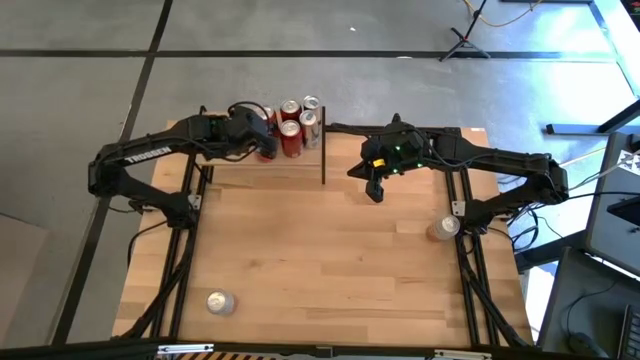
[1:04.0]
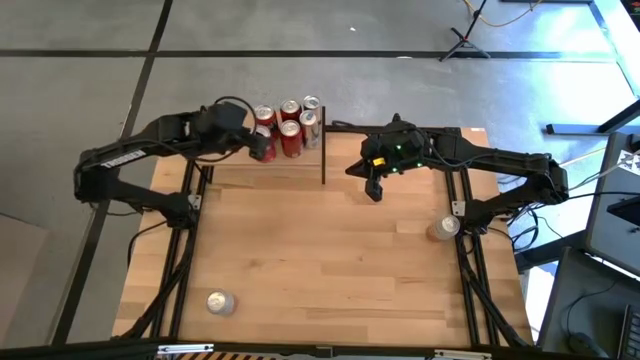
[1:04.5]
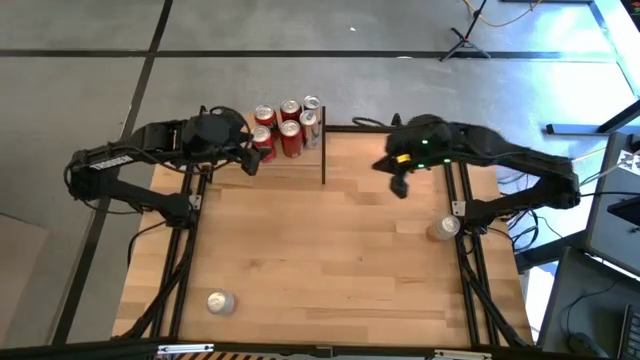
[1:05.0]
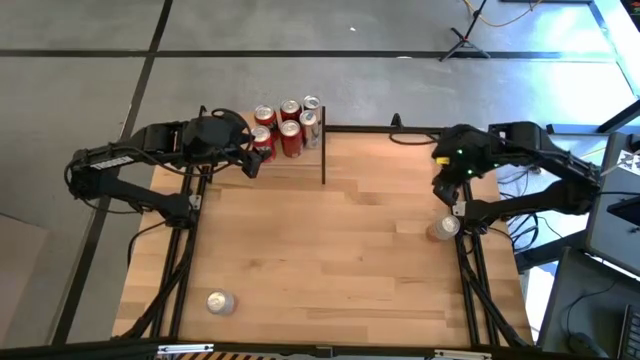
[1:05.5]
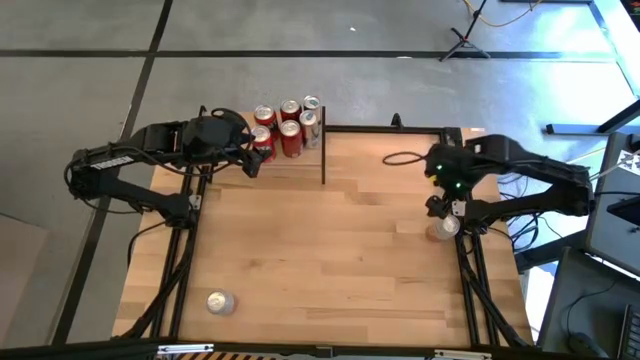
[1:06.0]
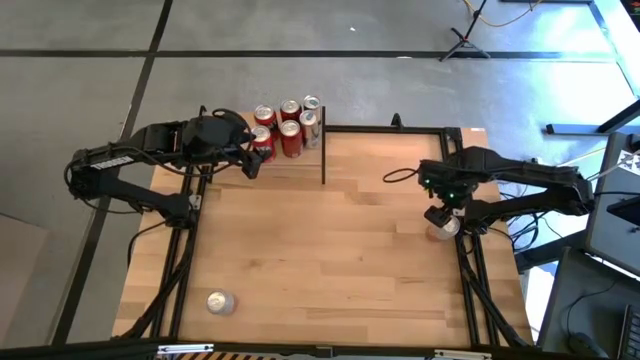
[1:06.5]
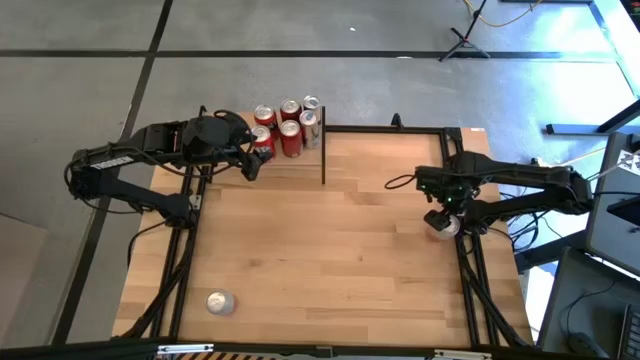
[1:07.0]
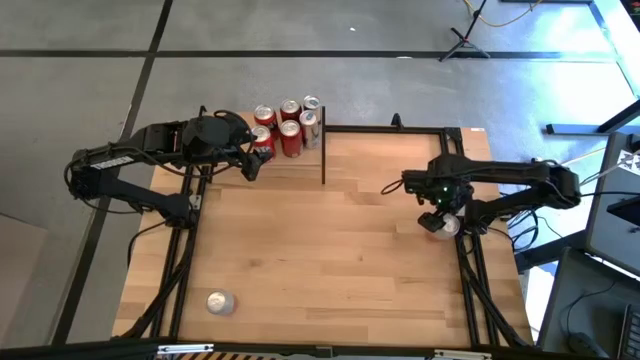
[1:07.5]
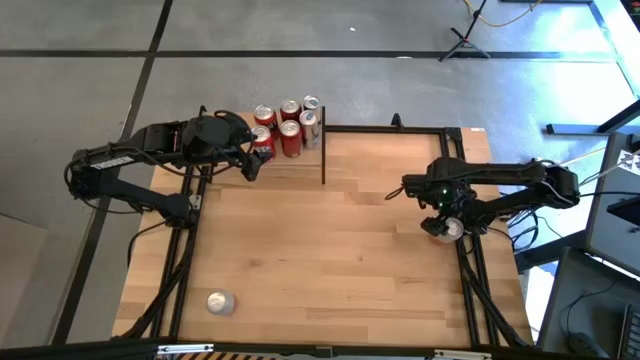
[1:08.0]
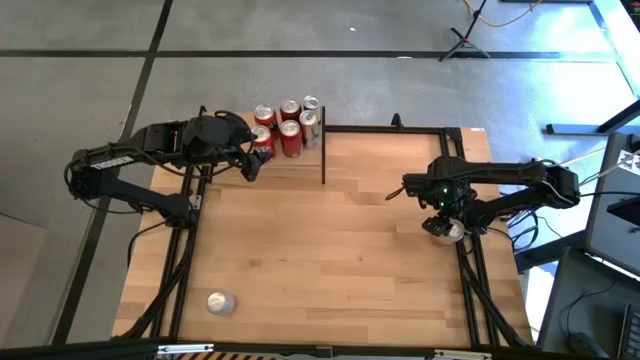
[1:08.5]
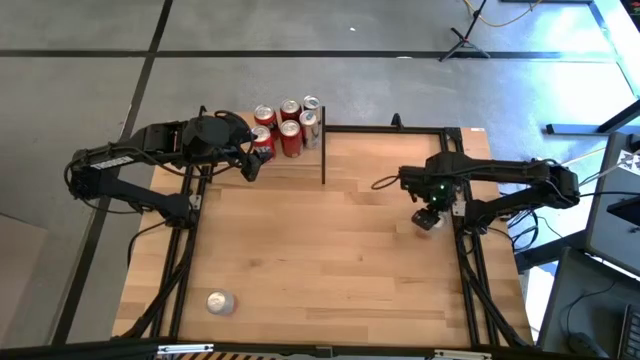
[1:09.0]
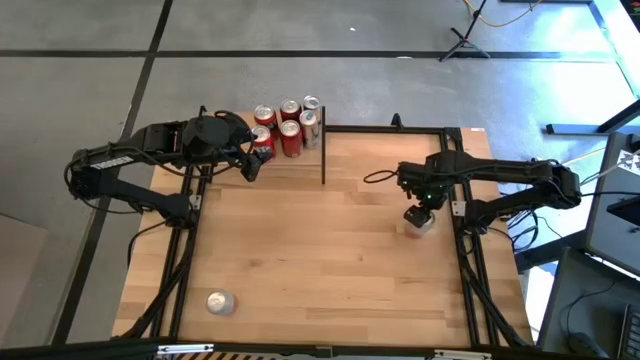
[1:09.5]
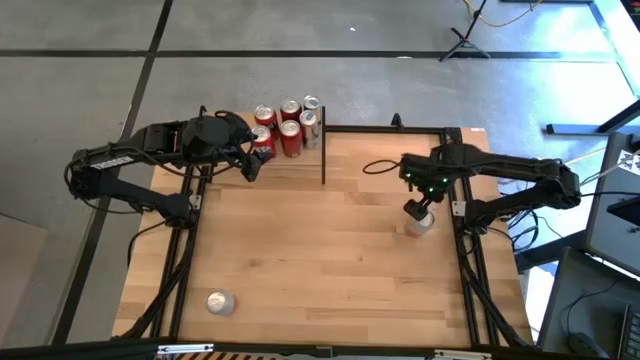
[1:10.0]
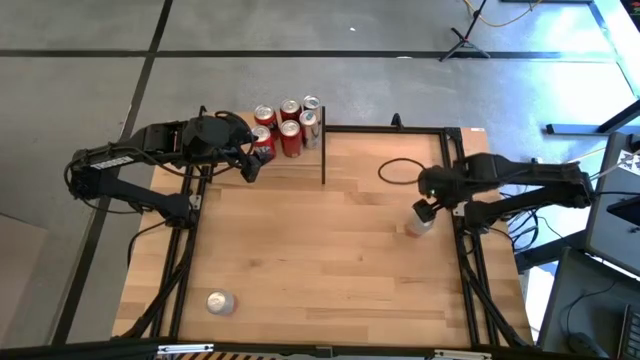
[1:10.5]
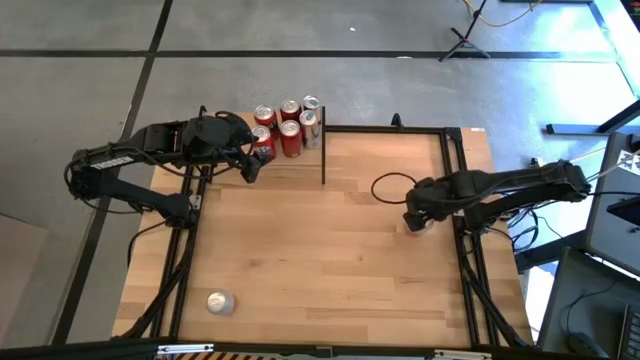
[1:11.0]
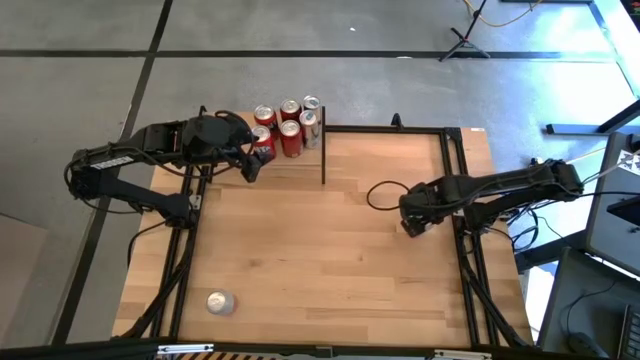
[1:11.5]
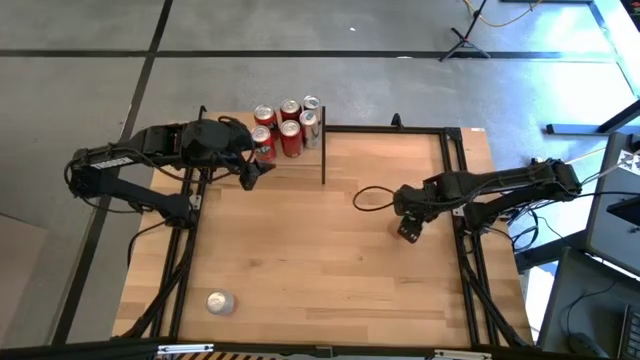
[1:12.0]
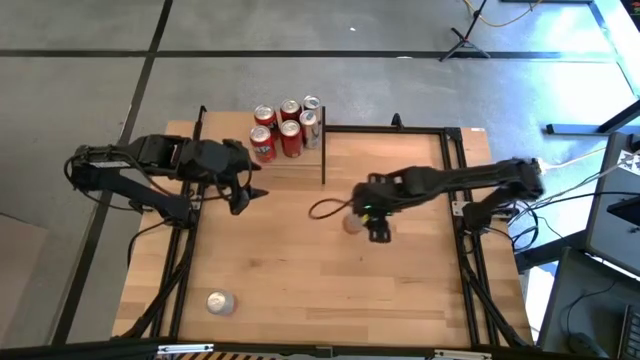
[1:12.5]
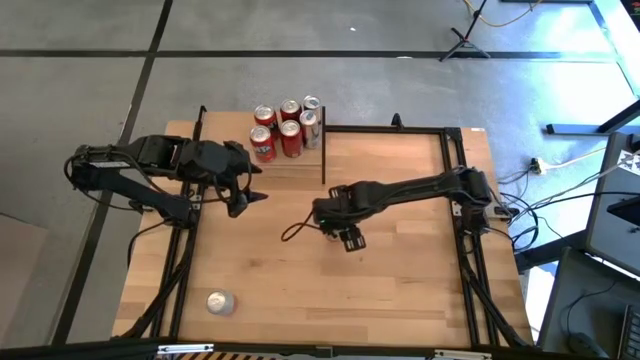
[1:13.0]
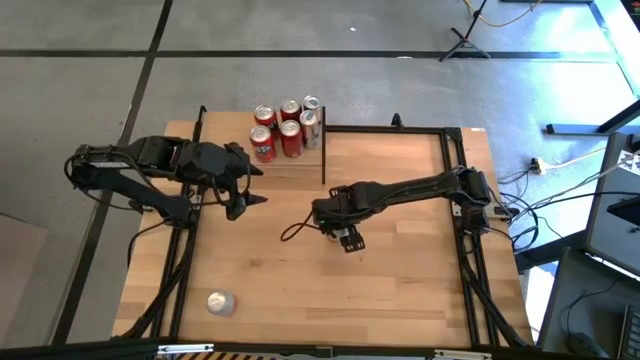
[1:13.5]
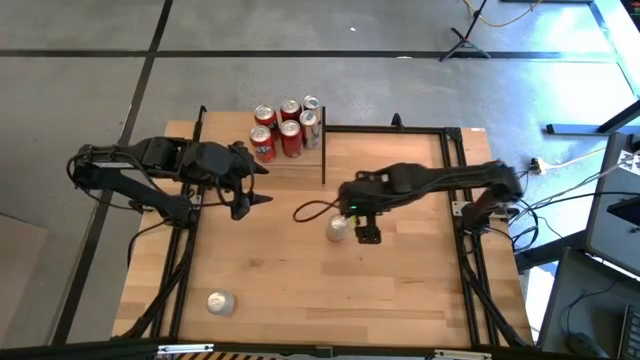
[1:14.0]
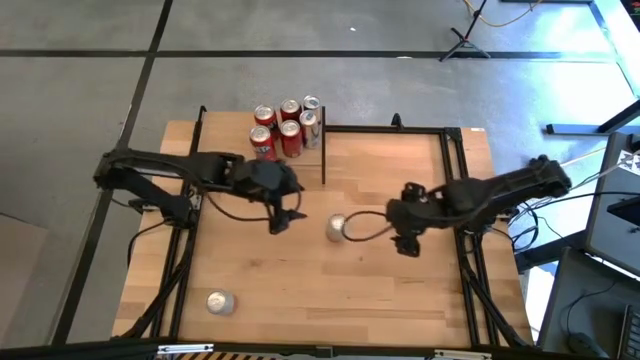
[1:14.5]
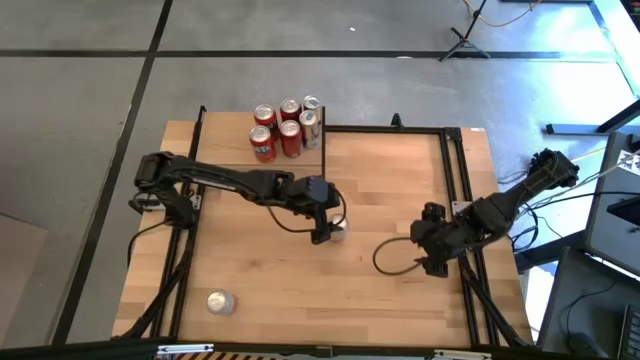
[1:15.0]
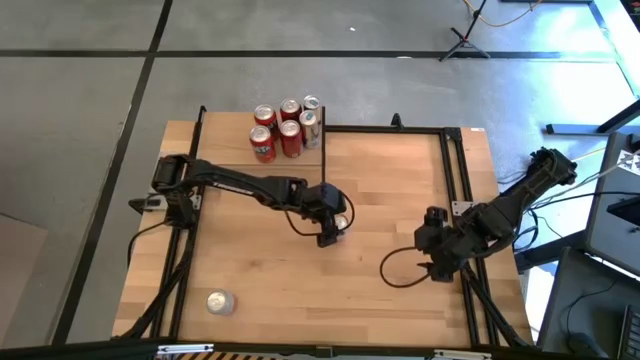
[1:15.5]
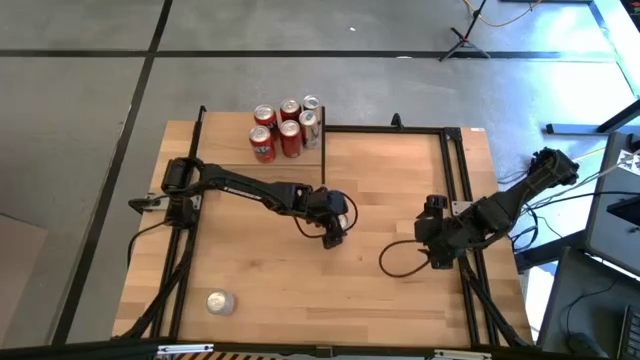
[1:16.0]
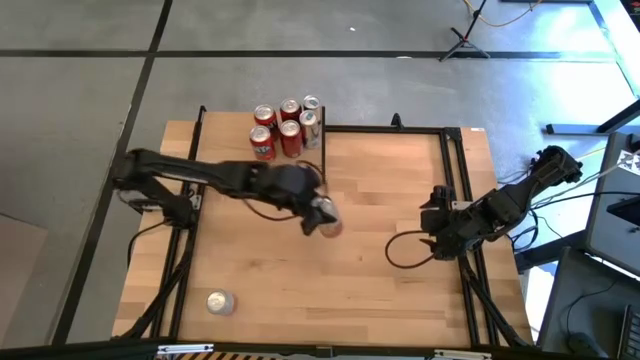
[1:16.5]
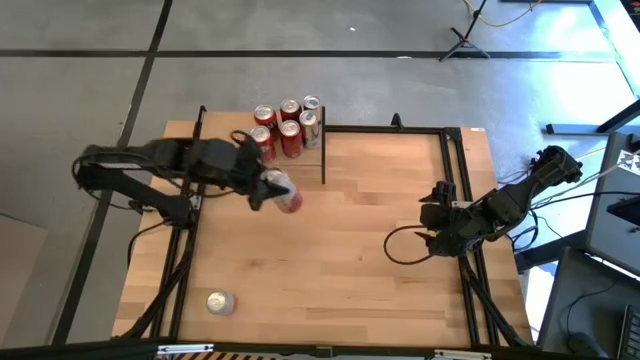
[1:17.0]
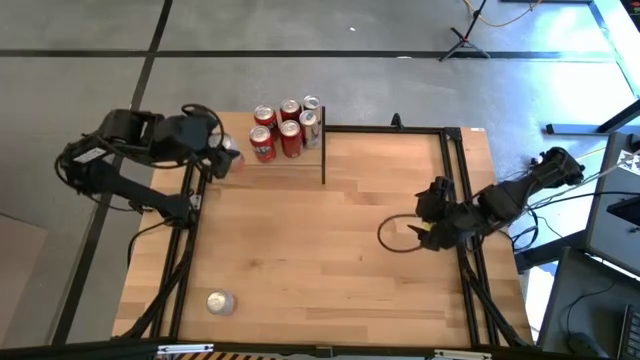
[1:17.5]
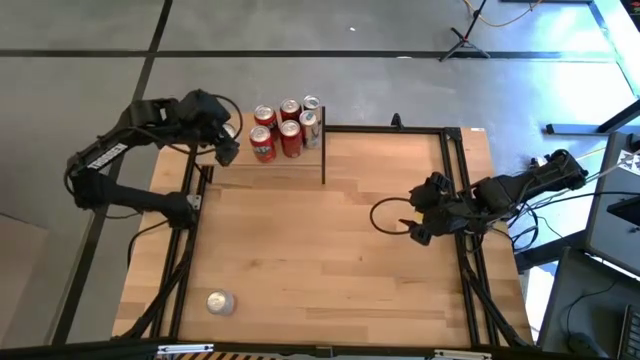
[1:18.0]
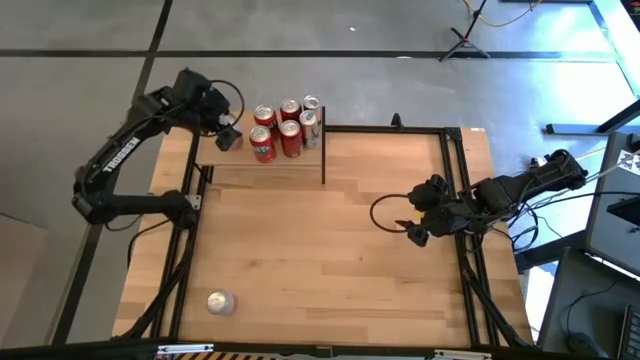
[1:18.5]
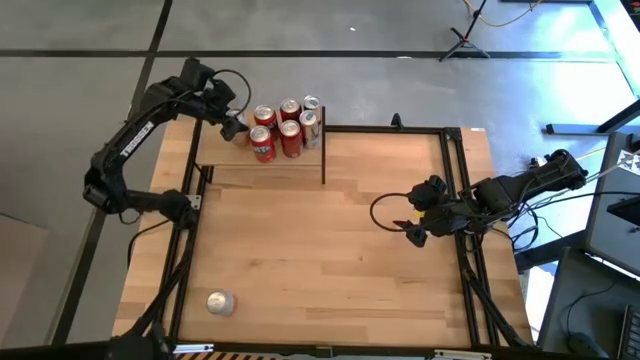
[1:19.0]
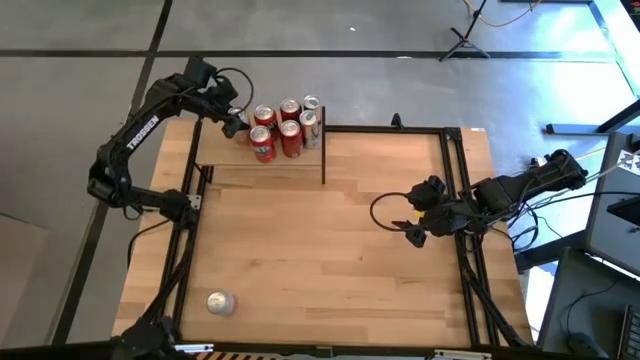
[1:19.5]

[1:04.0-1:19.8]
Task: Place canned beverage on shelf
Put the top orange/white soda can on the shelf

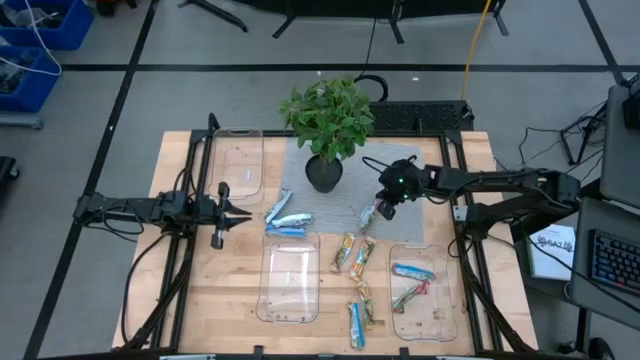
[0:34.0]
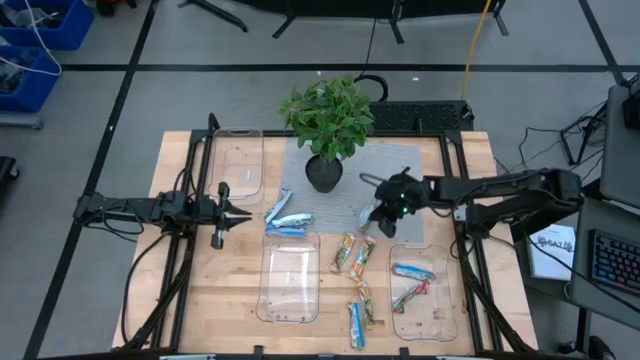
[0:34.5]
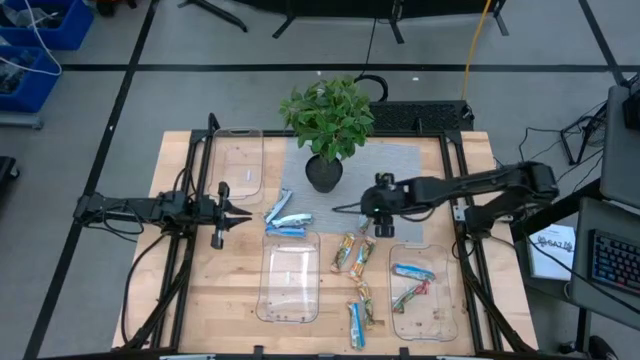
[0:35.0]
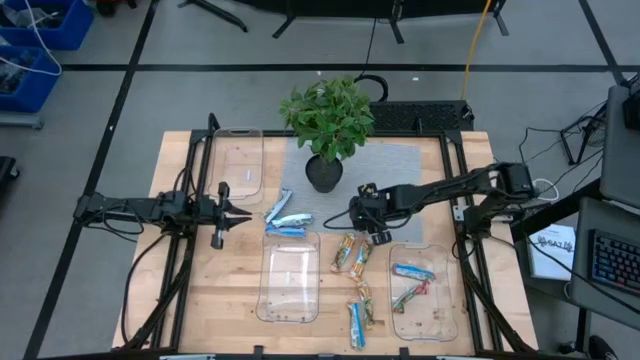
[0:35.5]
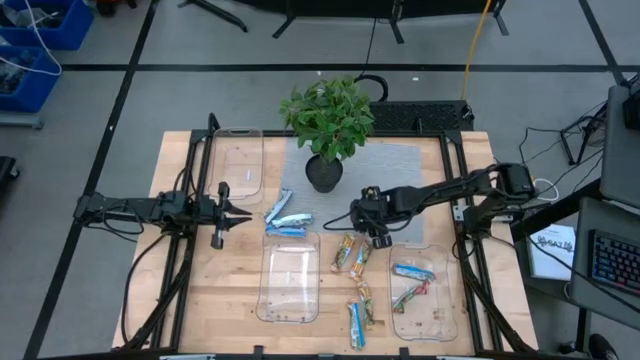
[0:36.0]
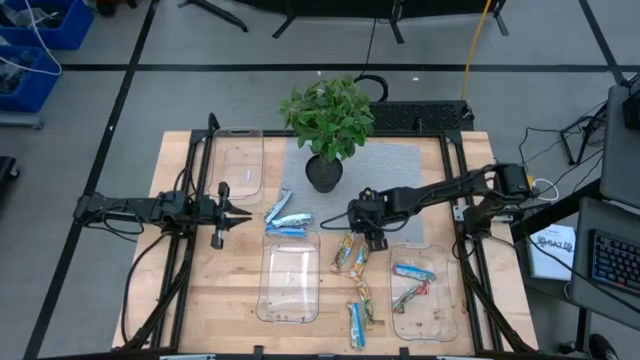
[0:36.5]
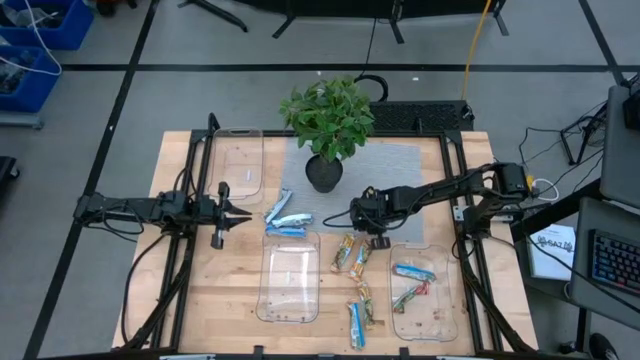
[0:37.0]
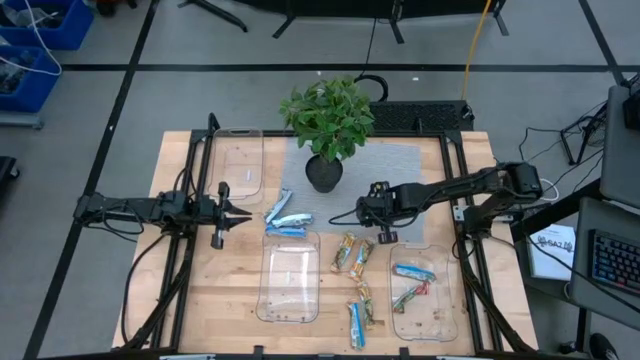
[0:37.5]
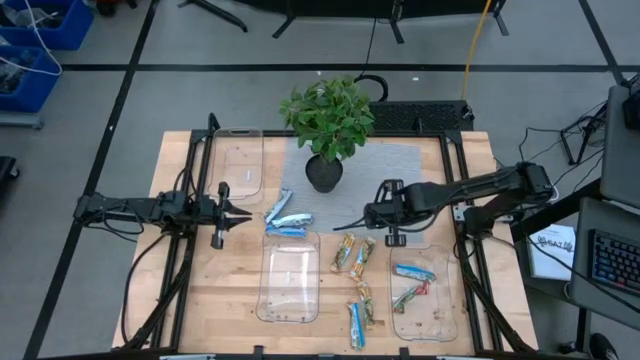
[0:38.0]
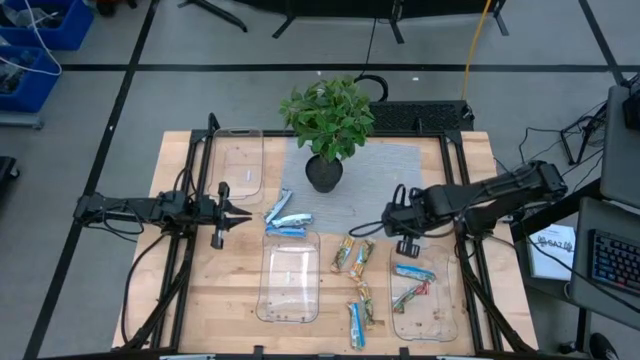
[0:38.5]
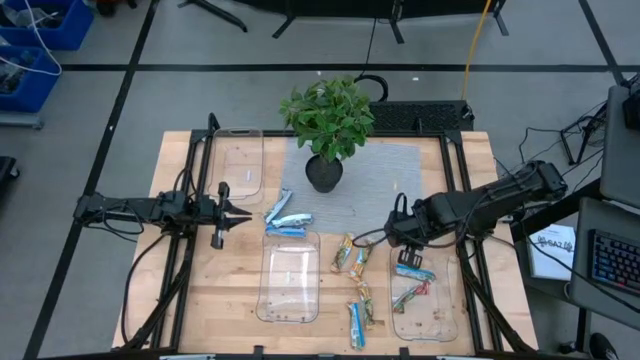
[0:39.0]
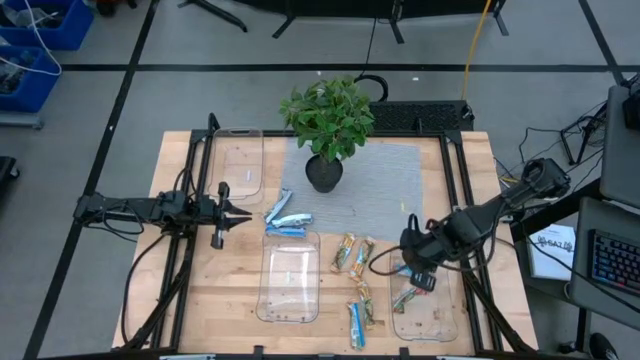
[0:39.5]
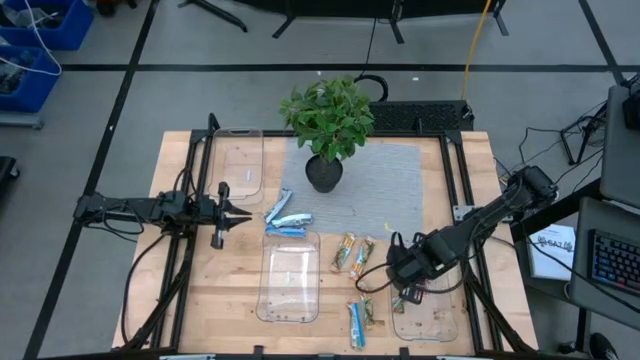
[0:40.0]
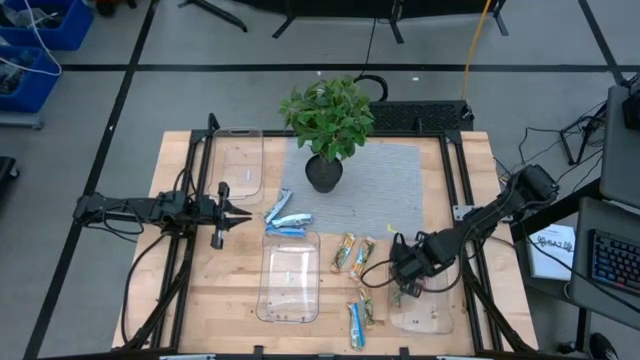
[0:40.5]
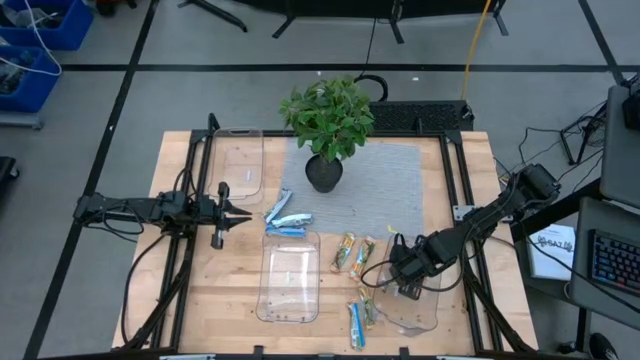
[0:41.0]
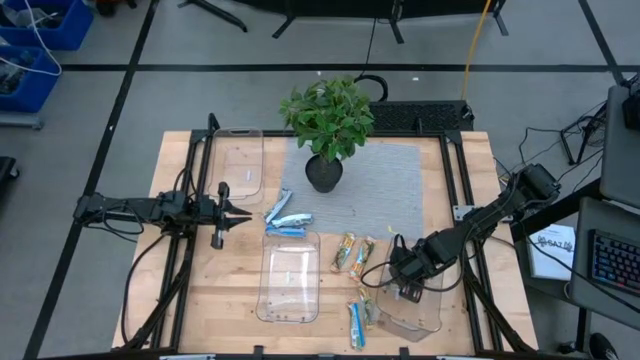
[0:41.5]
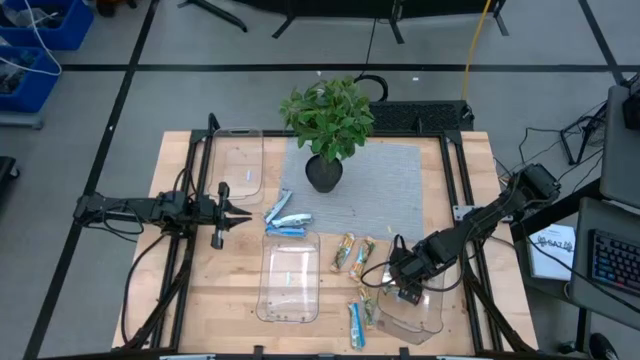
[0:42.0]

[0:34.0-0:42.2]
Task: Pick and place Granola Bars by type
Put the red granola bar into the bottom right transparent bin
